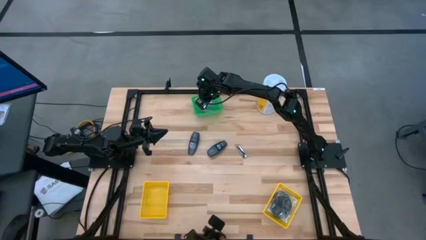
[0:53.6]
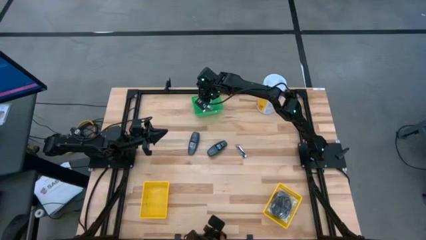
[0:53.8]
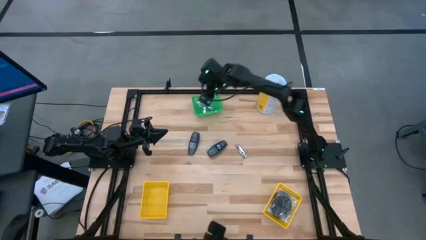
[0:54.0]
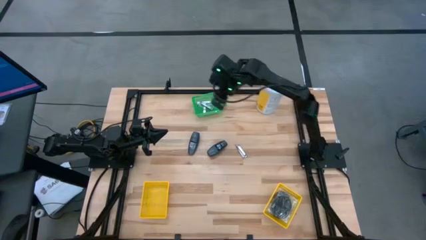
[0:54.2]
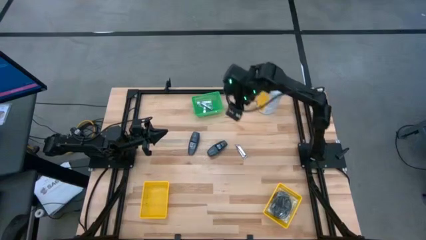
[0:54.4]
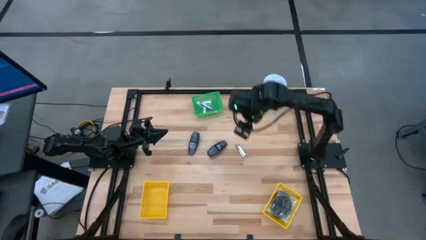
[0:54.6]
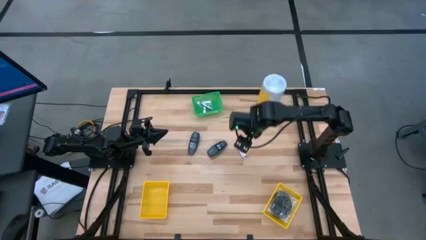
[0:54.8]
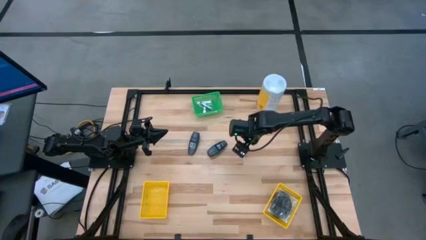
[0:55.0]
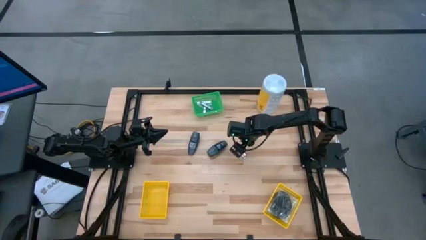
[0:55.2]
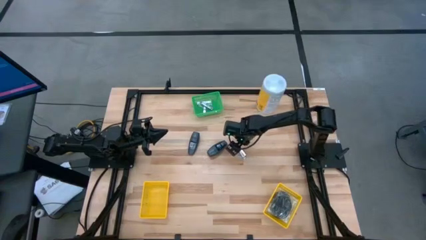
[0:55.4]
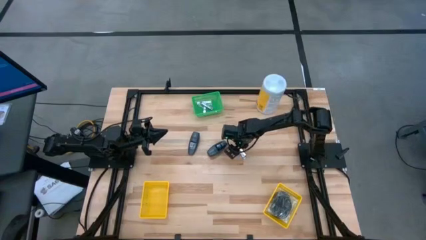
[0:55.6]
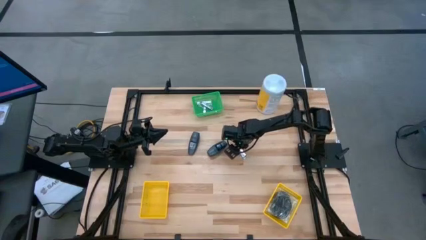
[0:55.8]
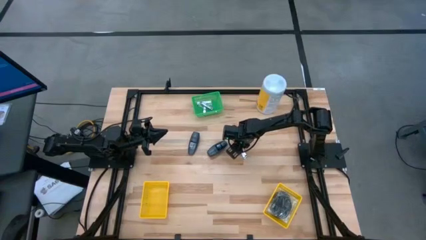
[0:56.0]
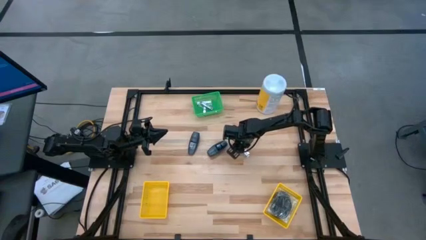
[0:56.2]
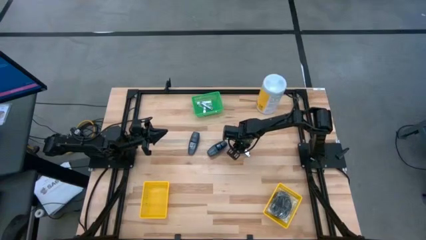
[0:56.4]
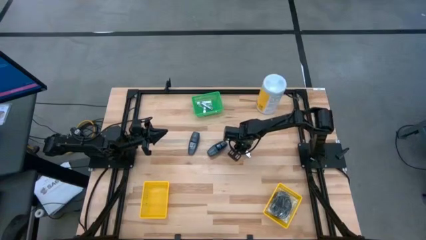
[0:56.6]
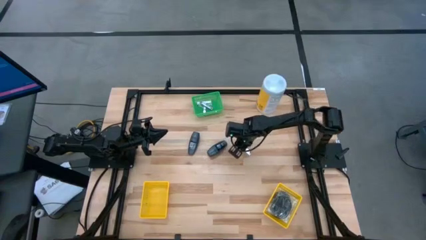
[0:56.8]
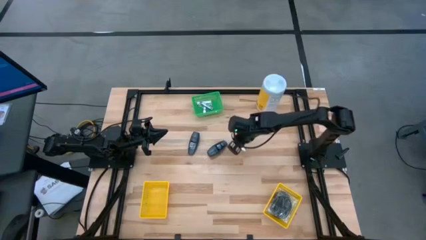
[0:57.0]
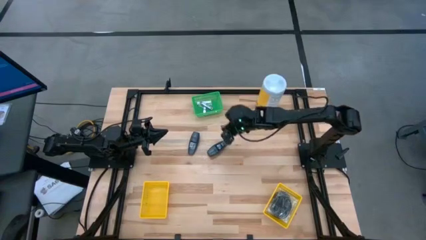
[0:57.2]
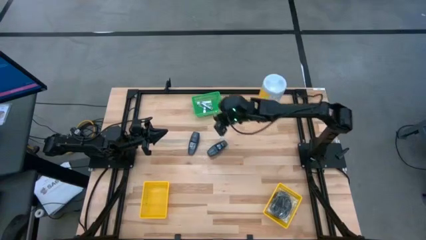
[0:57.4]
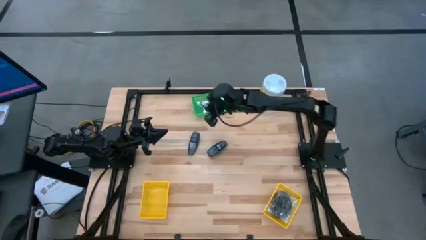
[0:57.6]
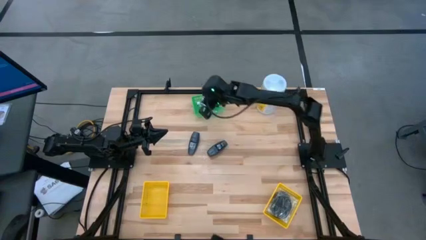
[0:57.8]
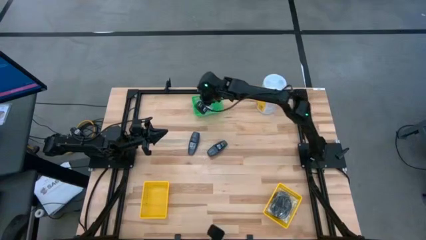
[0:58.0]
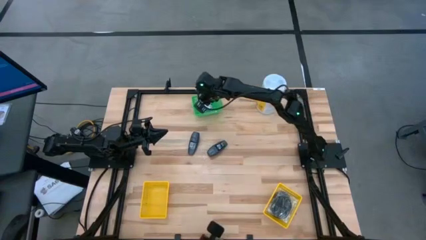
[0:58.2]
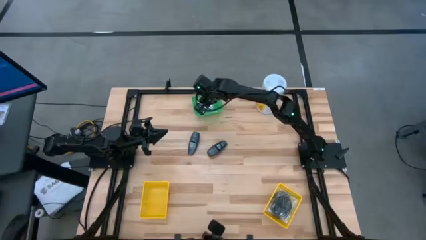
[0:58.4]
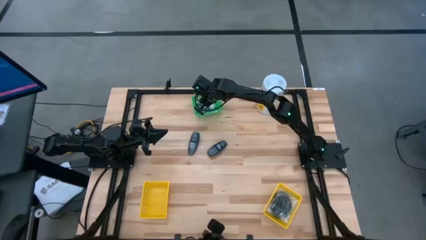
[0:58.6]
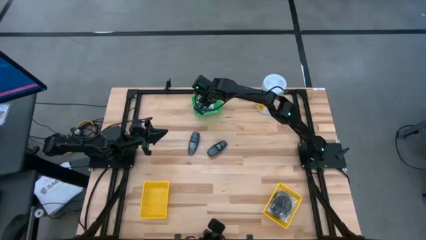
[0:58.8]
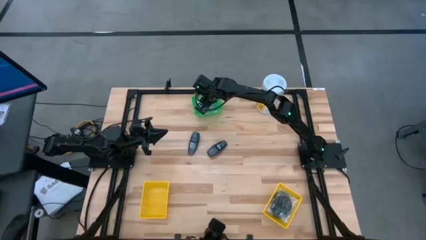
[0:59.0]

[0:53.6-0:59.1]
Task: Pick & Place Travel size toiletries
Put the silver nail cutter into the green bin

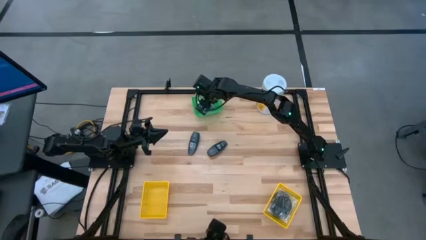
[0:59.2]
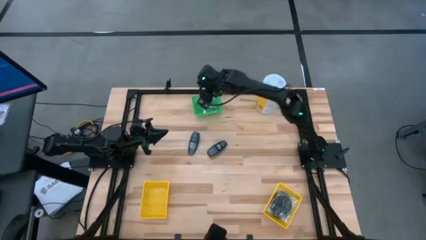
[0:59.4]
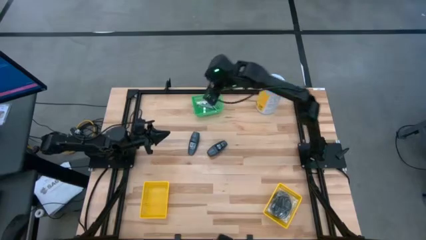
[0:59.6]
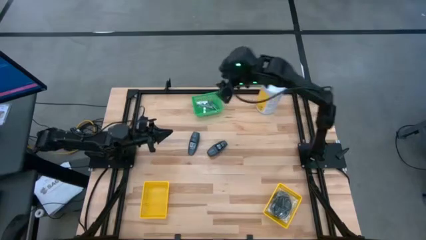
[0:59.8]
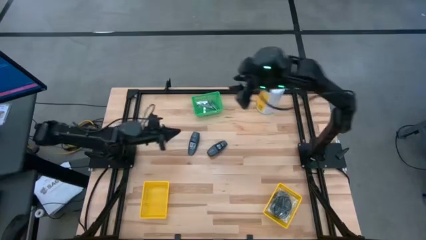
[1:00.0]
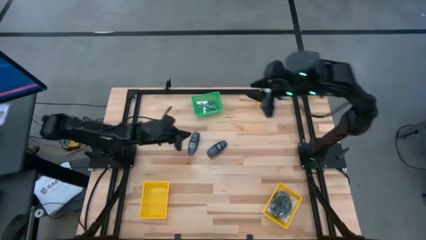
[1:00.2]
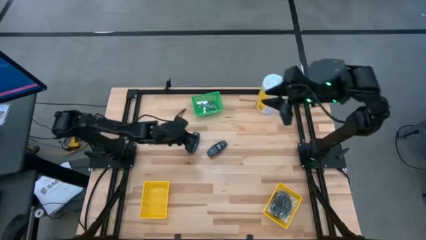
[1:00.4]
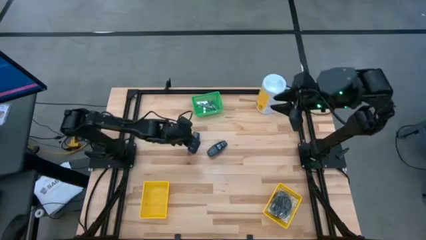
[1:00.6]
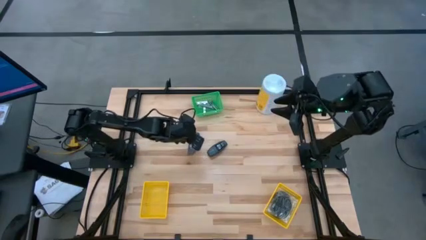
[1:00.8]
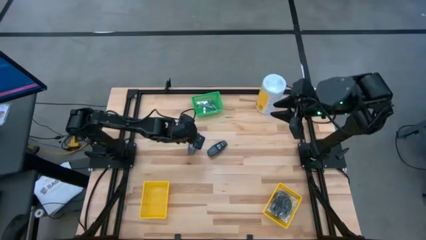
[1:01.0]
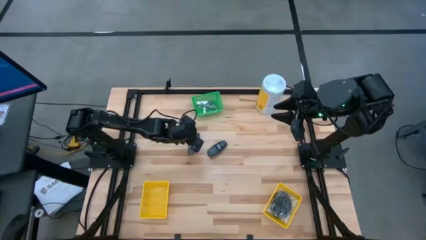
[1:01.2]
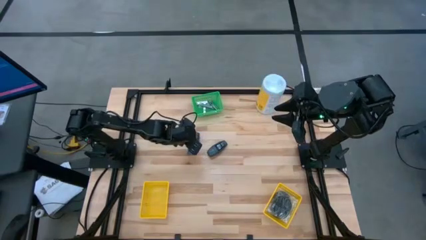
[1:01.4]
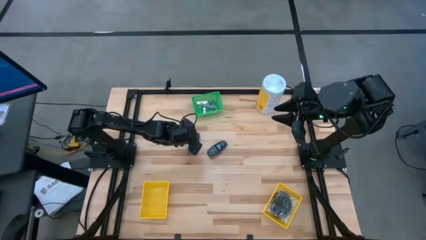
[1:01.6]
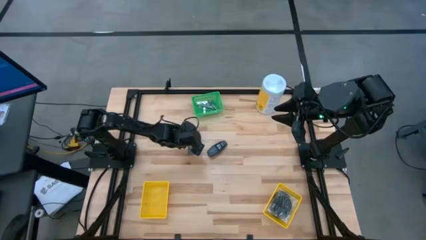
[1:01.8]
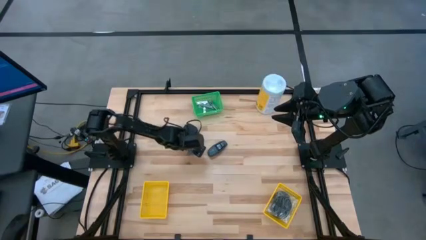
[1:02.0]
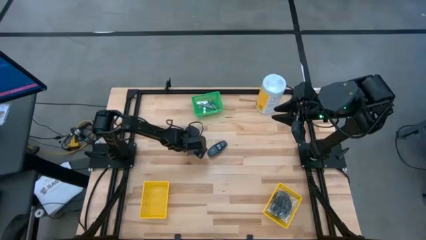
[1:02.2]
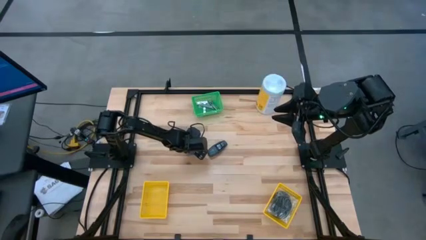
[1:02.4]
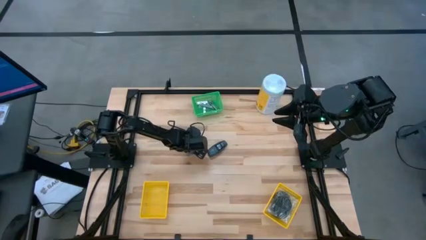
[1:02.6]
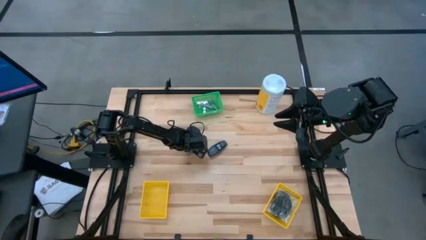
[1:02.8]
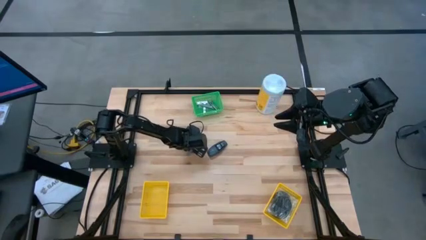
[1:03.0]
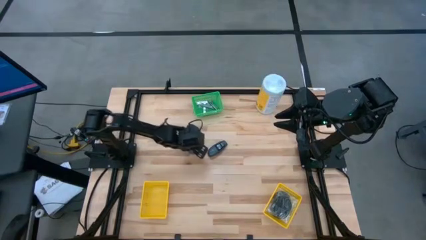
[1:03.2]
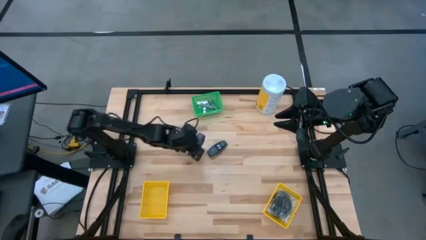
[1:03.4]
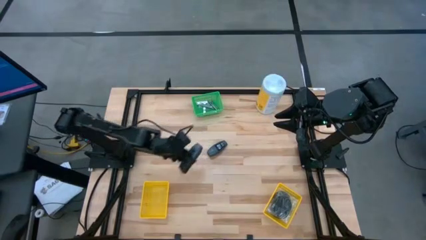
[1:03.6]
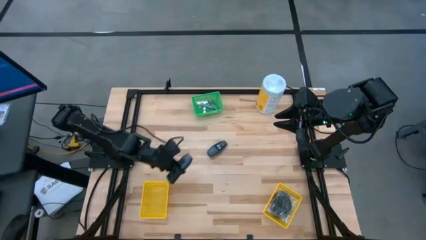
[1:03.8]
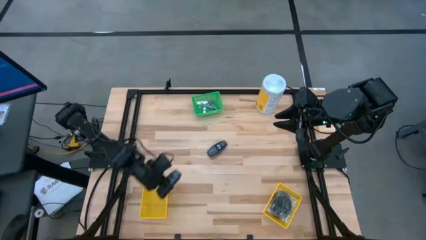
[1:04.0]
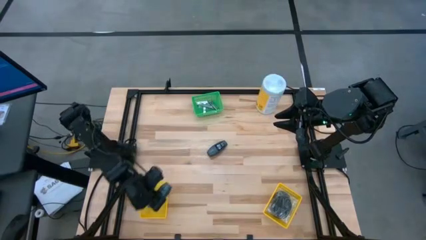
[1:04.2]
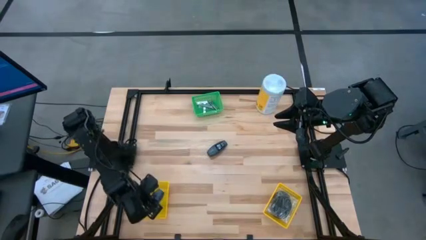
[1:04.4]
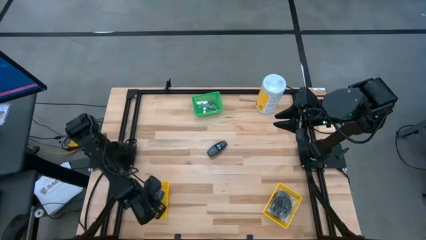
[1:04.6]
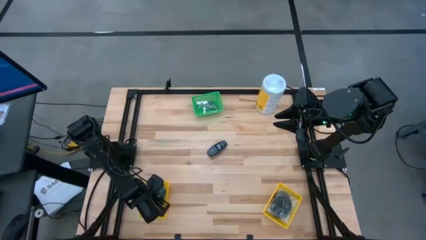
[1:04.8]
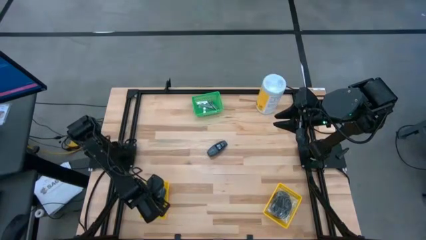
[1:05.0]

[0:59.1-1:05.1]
Put the gray deodorant into the left yellow bin

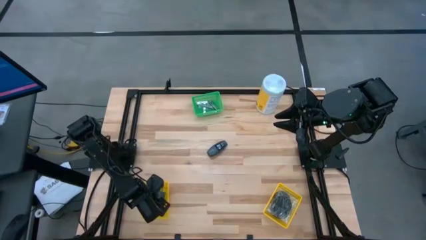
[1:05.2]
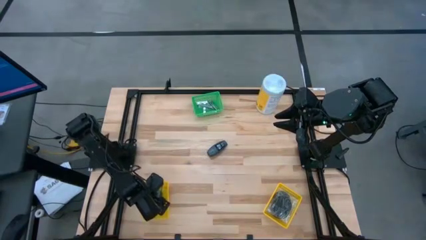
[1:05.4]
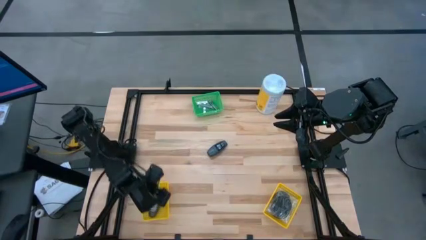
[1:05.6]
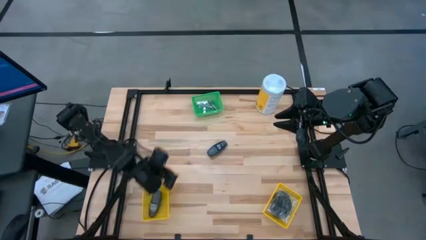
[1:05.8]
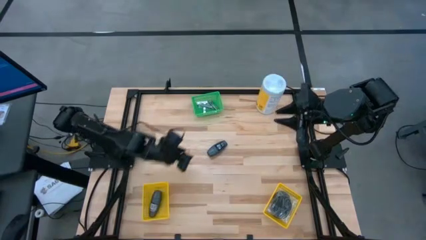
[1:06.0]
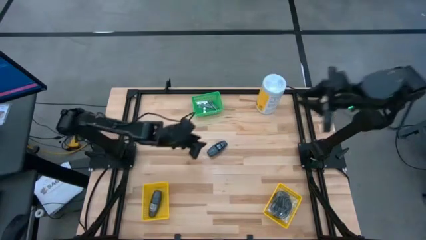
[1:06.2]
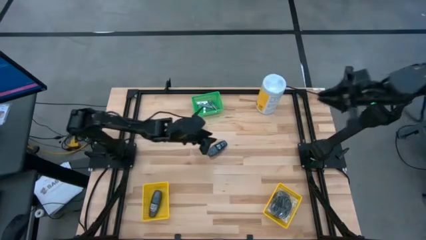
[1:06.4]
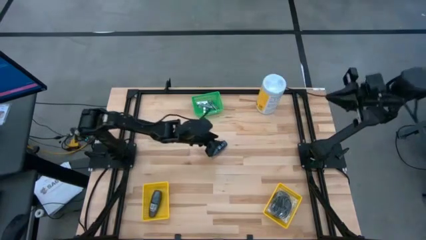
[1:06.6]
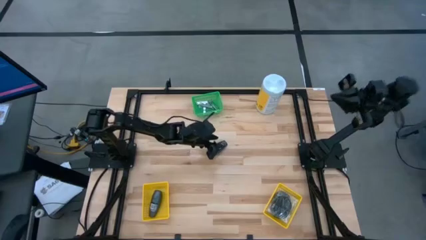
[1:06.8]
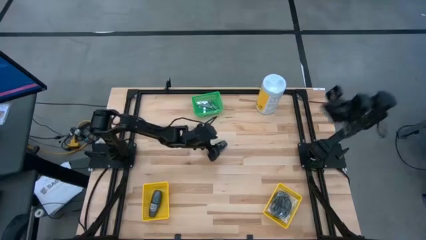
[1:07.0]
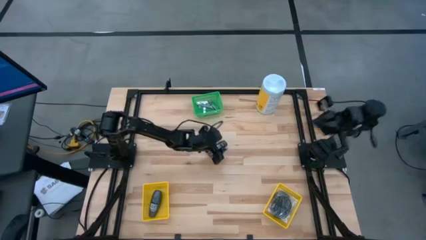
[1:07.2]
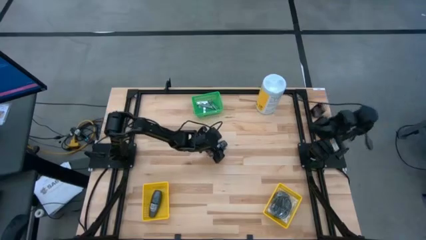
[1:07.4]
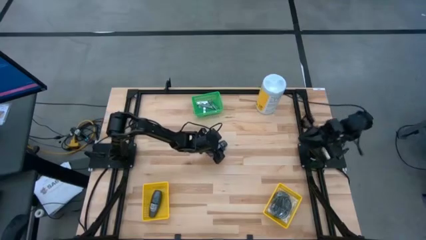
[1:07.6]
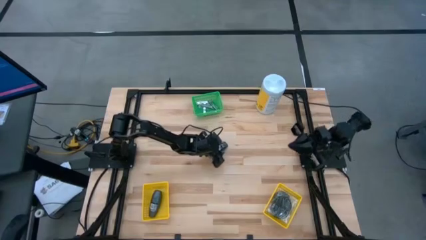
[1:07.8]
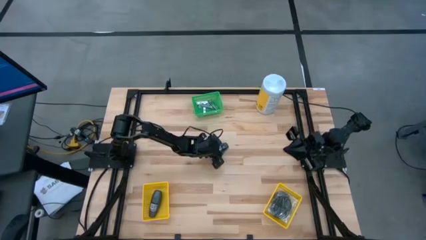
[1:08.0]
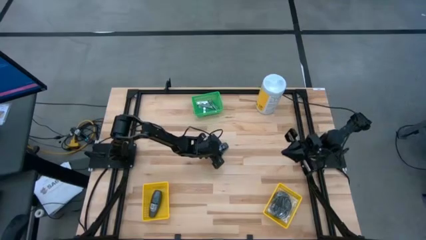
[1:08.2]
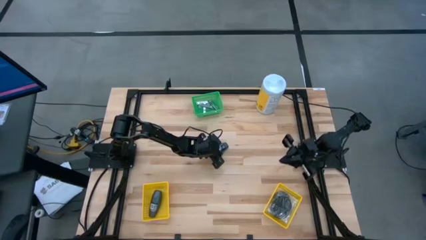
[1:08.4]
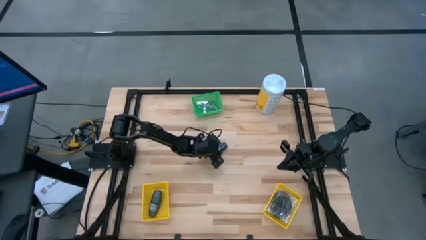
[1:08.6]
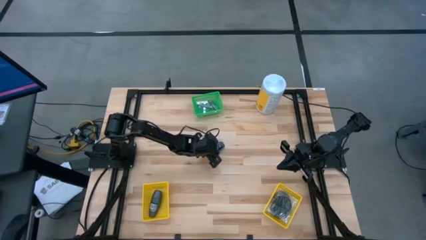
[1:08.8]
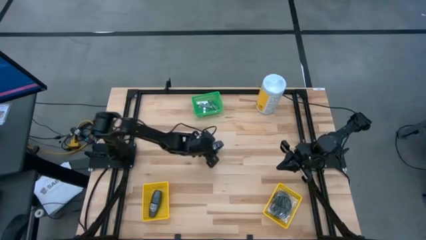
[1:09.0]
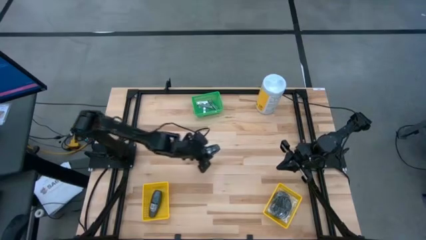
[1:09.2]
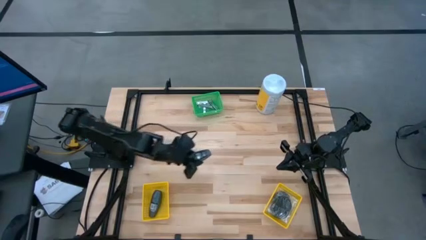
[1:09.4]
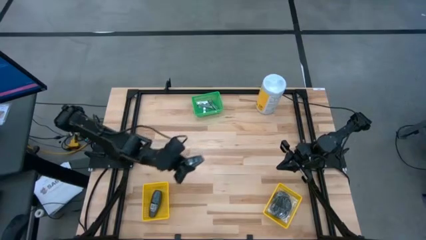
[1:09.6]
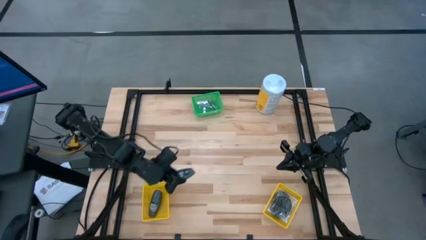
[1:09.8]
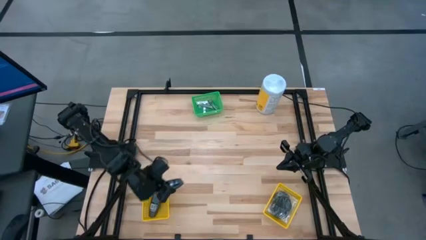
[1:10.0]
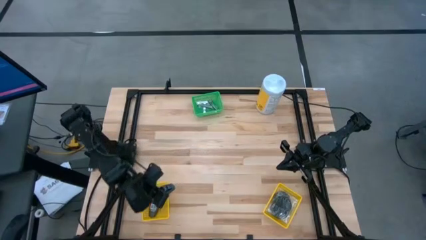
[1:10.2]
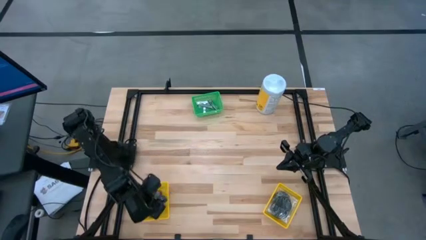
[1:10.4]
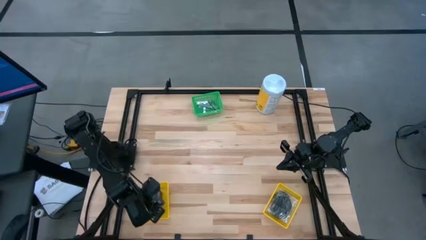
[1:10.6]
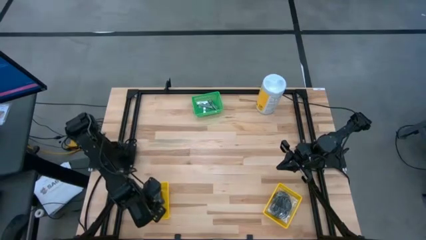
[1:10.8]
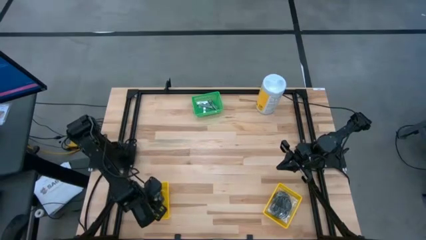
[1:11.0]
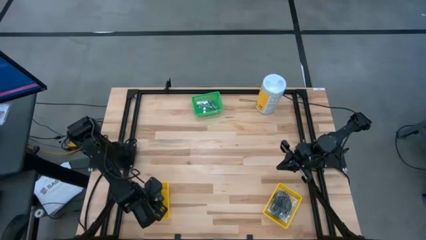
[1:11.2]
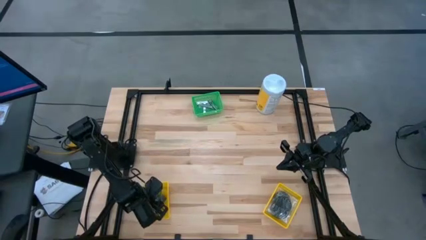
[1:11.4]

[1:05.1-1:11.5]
Put the gray deodorant into the left yellow bin
